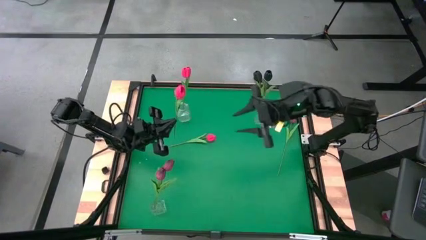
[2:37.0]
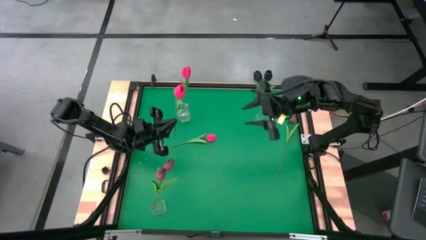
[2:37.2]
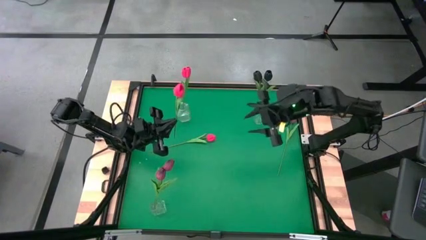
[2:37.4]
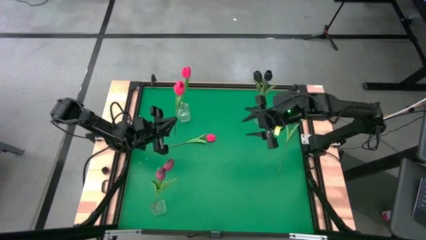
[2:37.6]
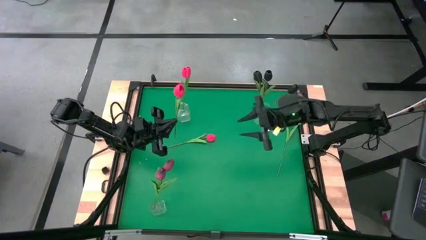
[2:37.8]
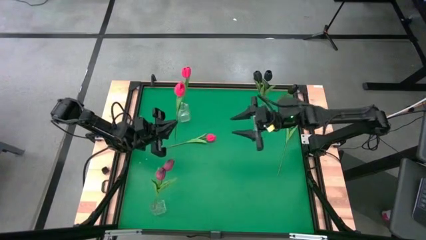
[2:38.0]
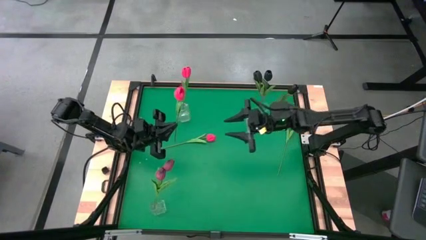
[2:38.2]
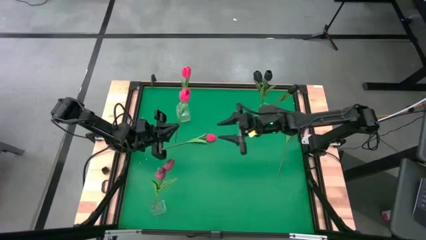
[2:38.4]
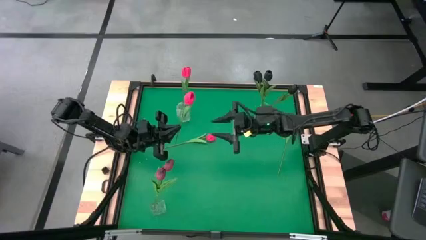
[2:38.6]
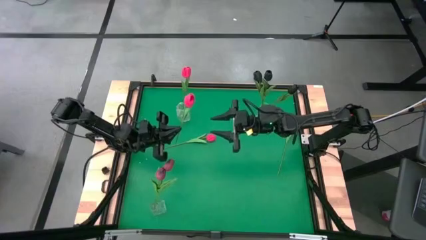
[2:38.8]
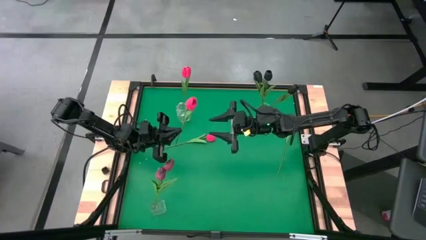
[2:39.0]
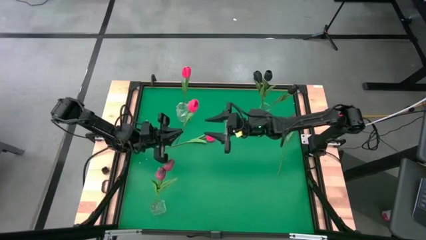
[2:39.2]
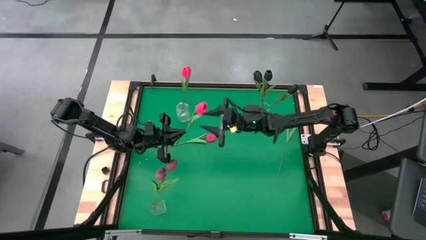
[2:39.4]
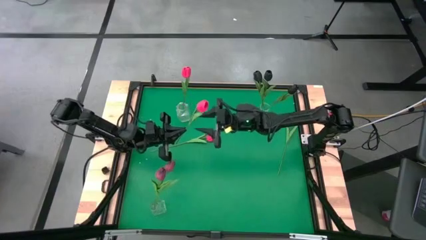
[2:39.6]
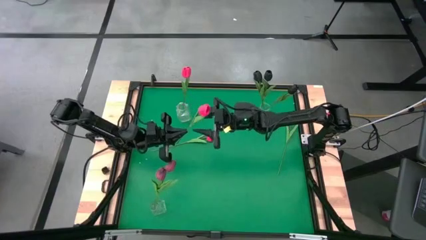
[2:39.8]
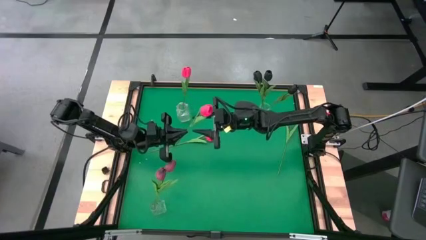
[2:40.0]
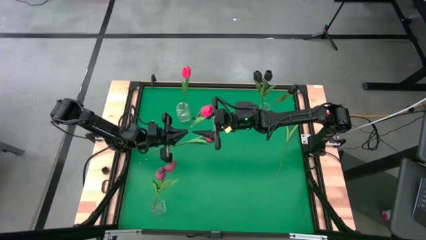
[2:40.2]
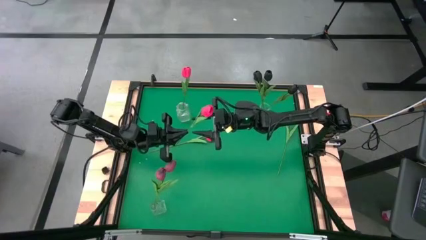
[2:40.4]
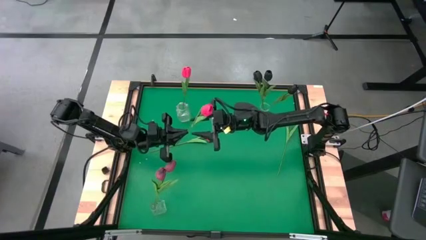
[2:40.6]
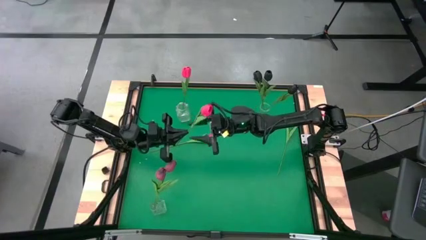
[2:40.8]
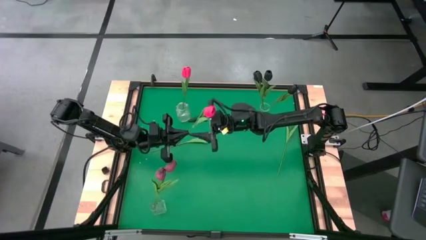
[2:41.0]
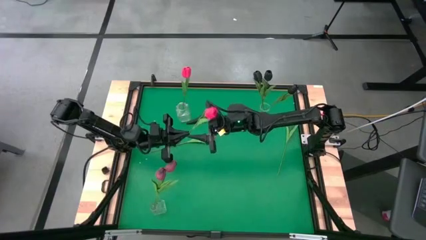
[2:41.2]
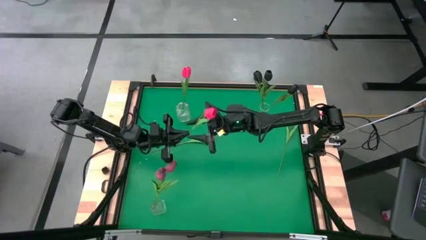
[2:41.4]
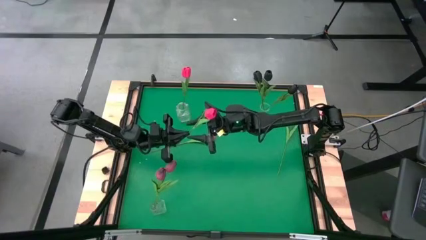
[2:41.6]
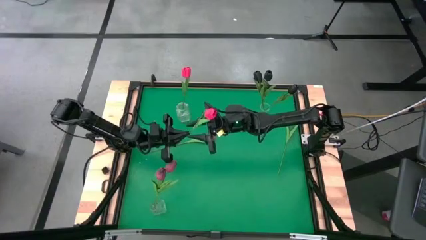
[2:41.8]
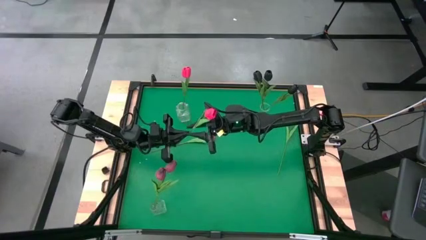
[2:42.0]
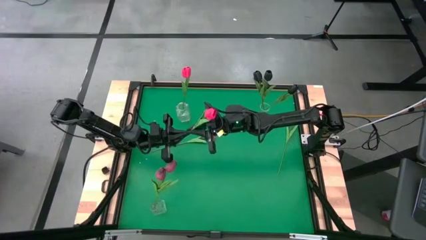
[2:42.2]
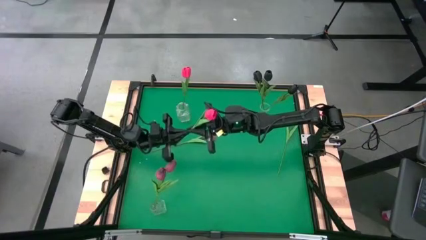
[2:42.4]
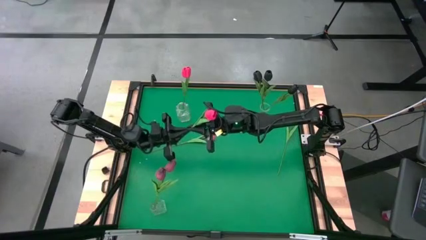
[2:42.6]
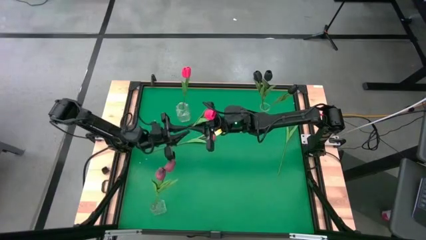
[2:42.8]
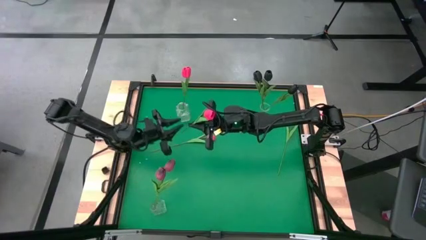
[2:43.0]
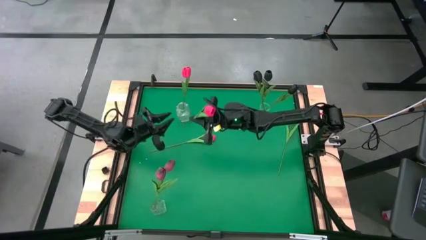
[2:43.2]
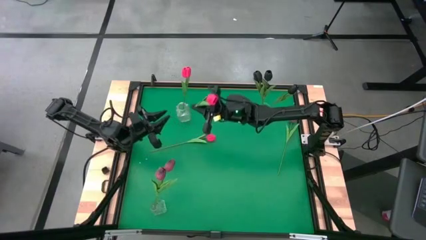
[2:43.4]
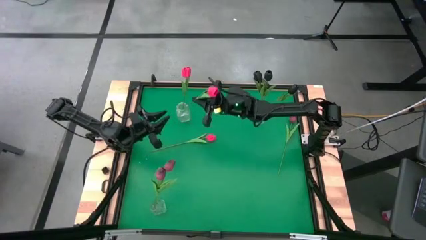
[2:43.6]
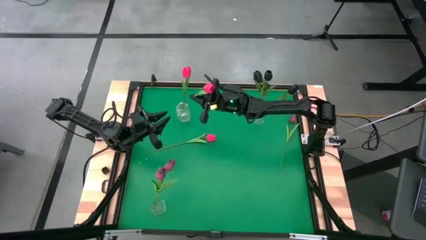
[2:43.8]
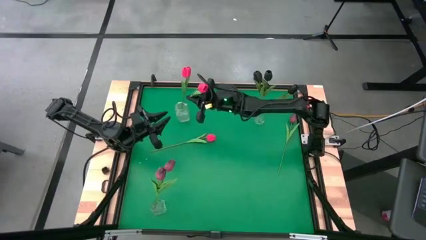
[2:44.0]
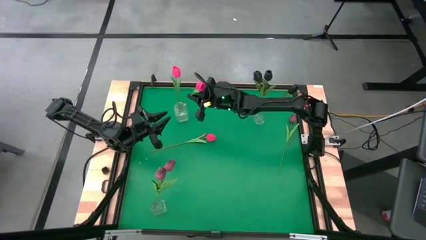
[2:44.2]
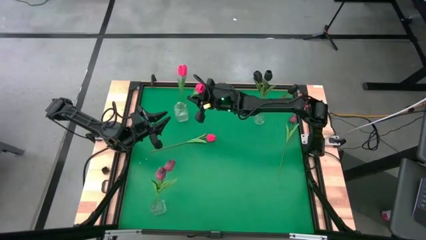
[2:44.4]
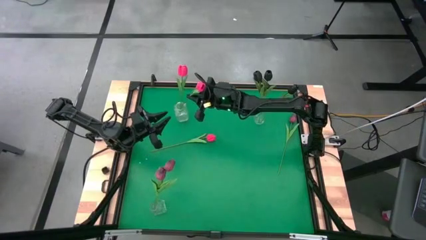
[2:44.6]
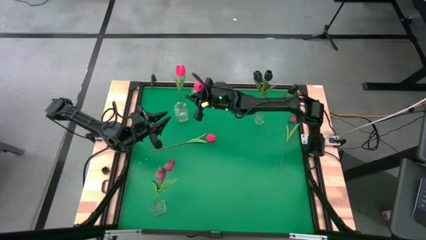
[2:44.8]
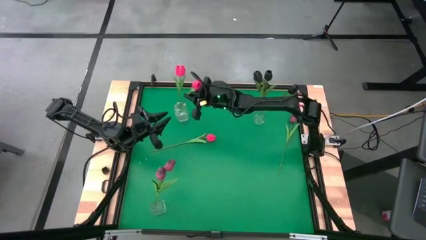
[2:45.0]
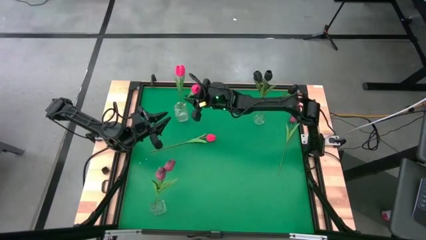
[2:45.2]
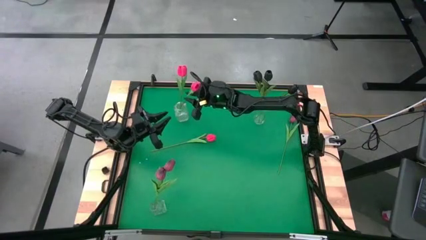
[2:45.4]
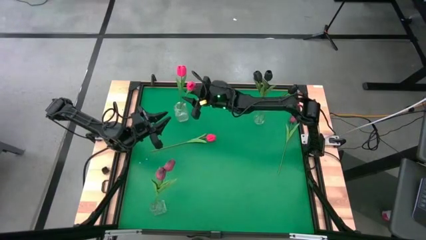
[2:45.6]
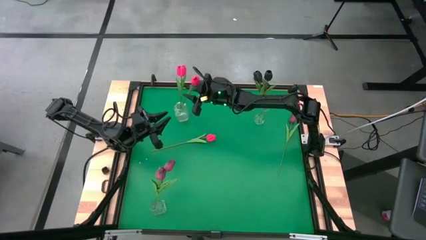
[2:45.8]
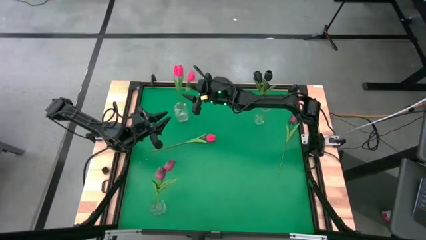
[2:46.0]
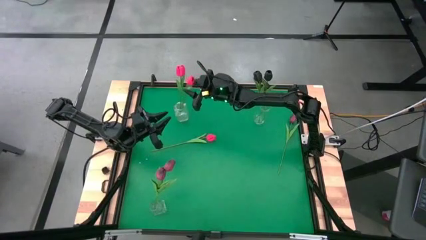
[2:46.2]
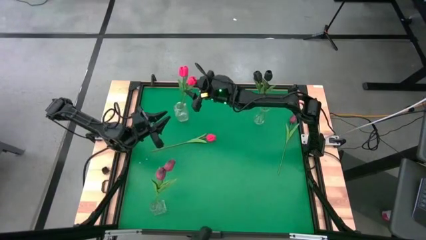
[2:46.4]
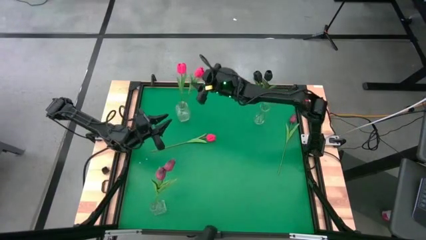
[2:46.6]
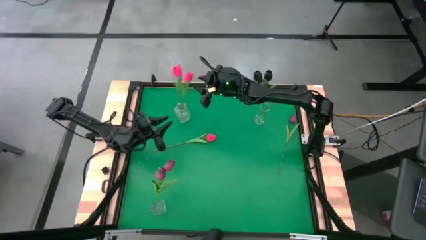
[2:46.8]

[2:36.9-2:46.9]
Task: Sort flowers into vase by color
Put the top pink flower into the top left transparent vase

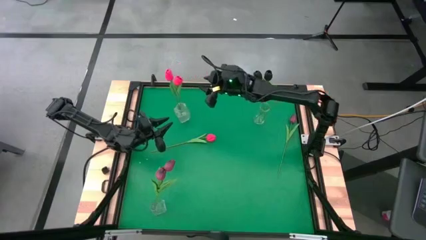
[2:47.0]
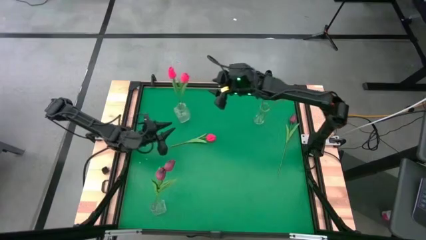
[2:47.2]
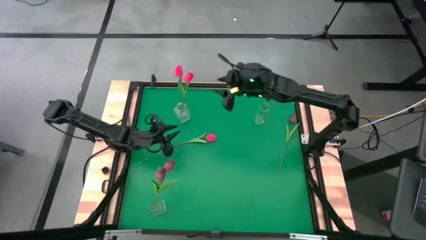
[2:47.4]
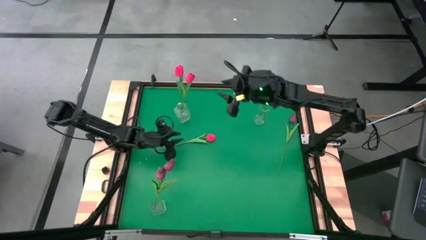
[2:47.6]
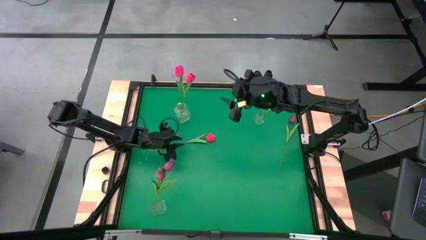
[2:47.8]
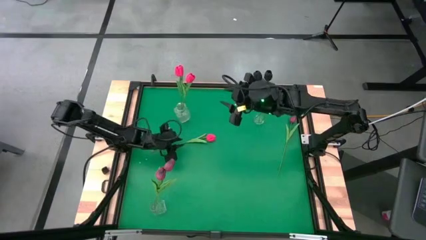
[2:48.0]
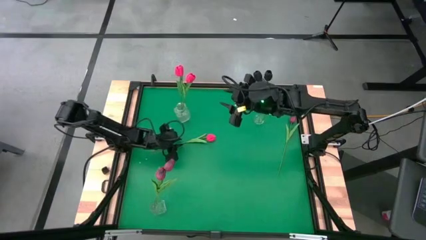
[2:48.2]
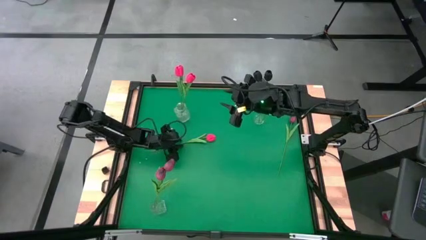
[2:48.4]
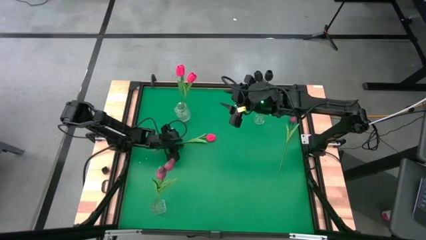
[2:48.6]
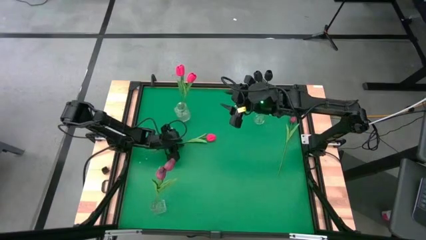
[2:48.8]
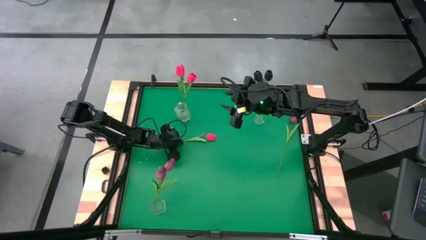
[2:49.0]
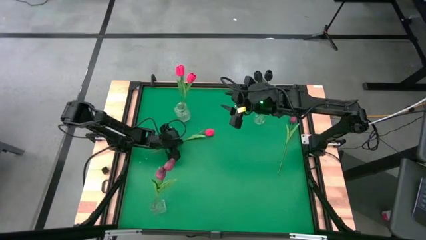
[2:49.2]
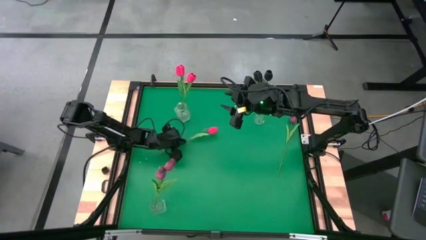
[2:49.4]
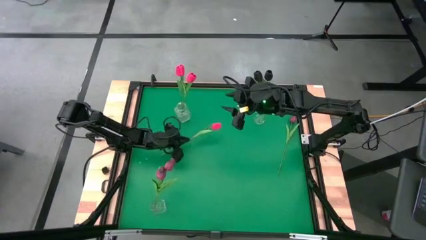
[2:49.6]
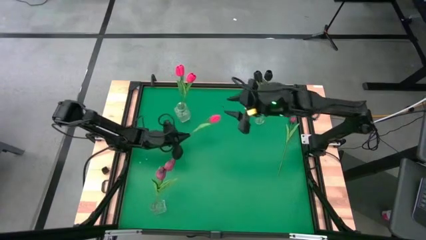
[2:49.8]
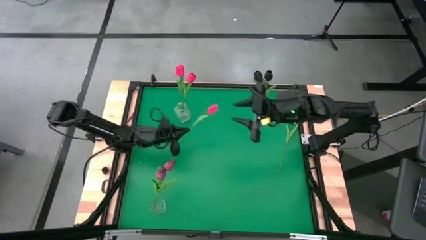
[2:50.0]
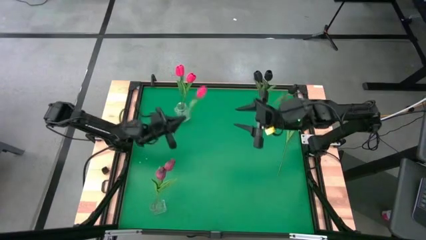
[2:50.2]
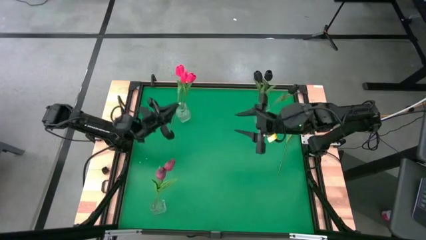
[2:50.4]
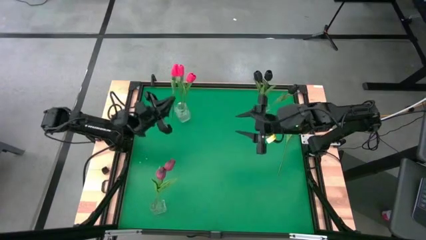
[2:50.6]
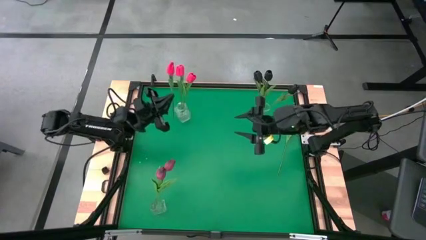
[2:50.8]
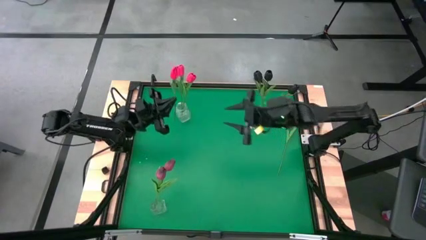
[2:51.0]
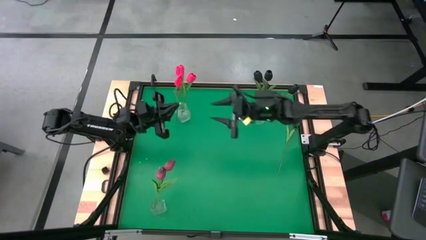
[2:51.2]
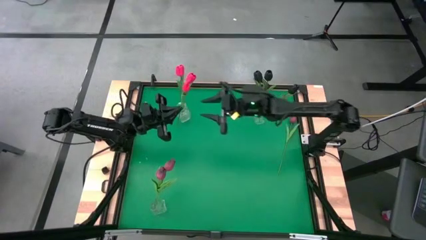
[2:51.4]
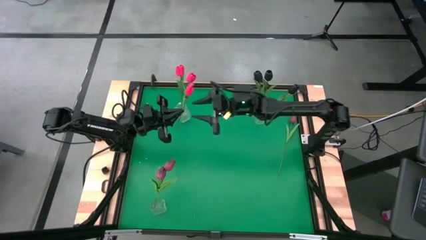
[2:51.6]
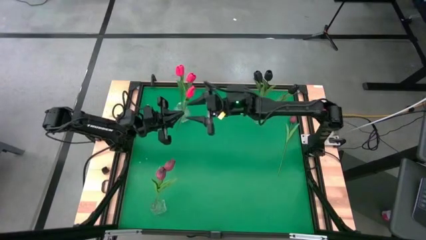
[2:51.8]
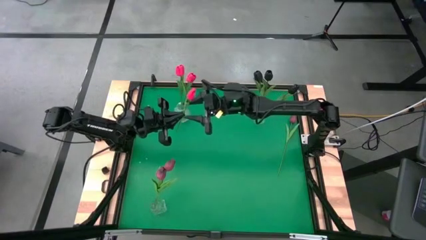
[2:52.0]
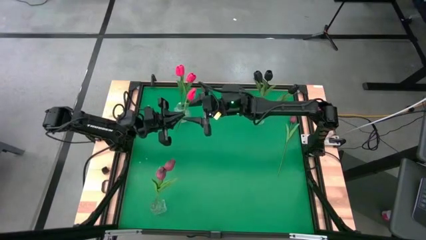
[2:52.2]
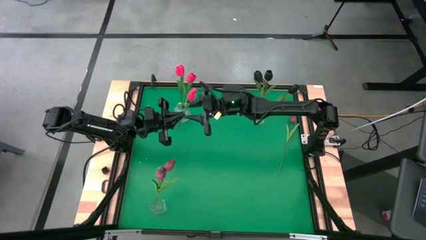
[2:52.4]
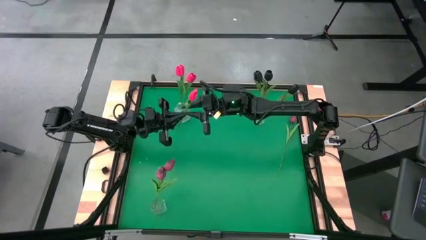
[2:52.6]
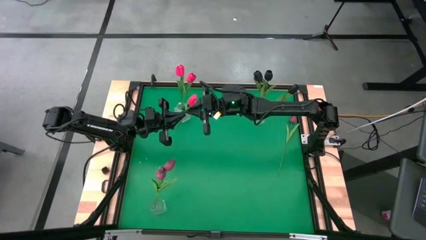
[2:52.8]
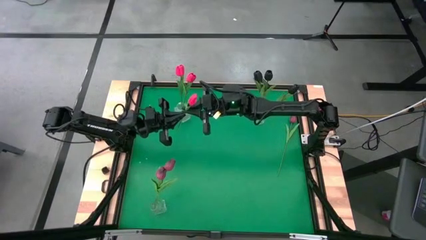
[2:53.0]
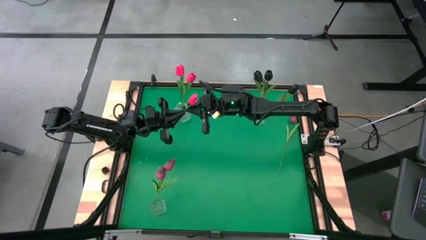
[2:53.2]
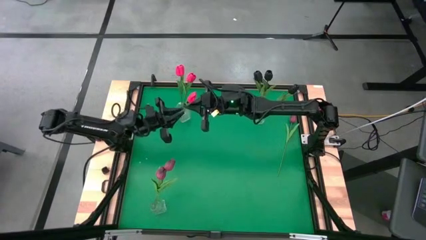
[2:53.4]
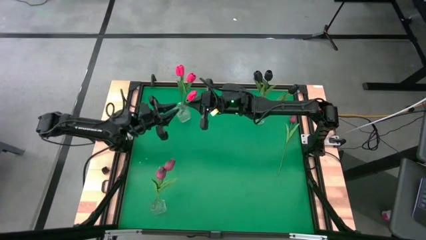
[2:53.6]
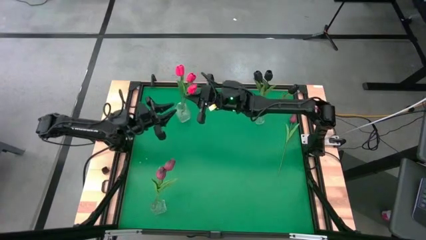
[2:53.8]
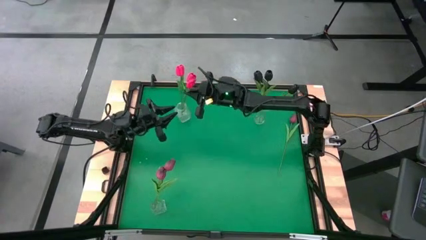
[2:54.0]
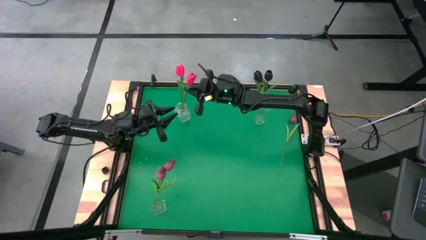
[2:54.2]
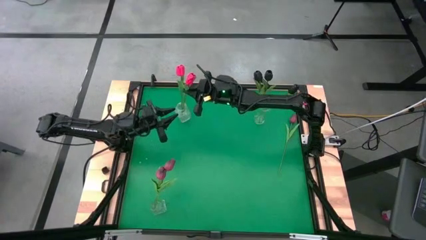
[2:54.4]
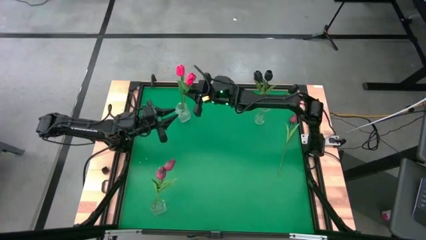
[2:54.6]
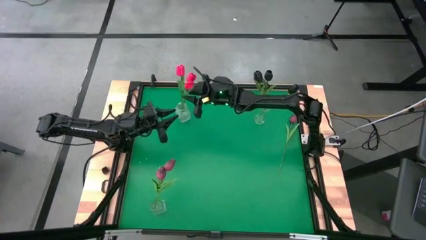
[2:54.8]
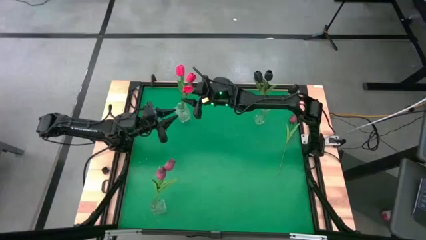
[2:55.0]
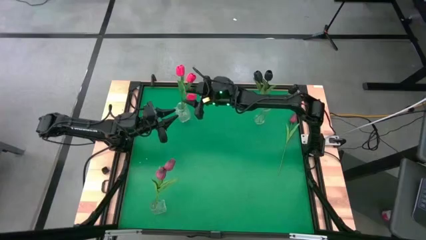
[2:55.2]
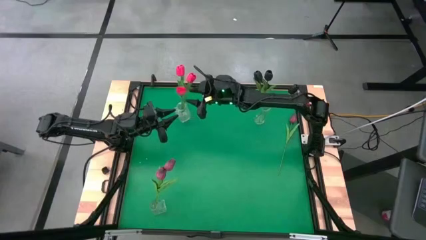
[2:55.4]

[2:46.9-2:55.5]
Put the pink flower into the top left transparent vase
